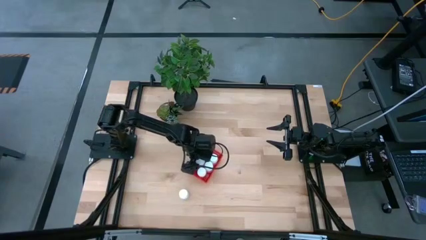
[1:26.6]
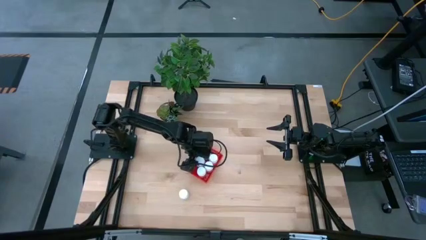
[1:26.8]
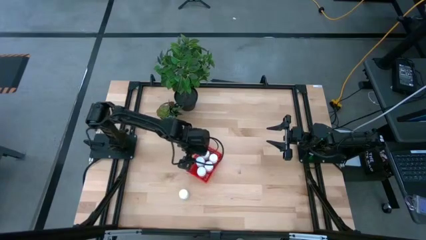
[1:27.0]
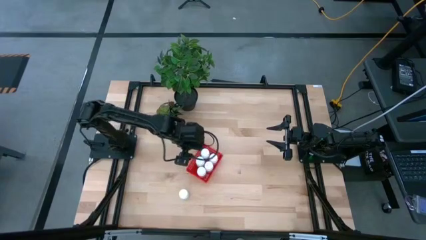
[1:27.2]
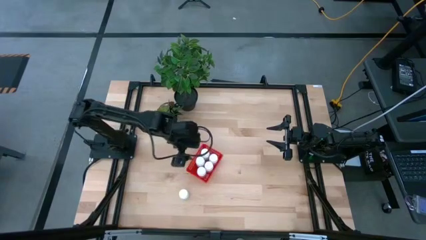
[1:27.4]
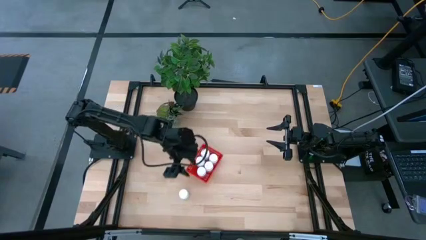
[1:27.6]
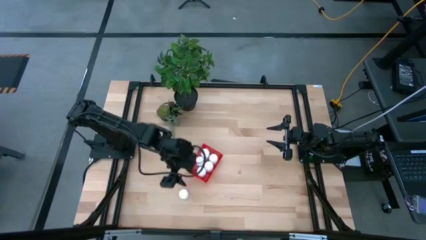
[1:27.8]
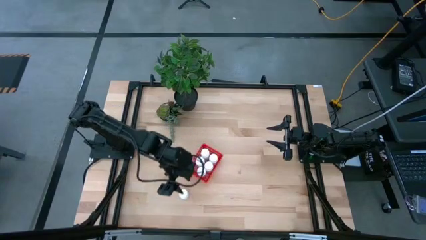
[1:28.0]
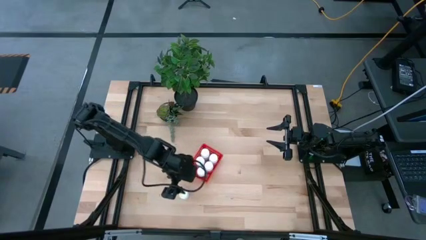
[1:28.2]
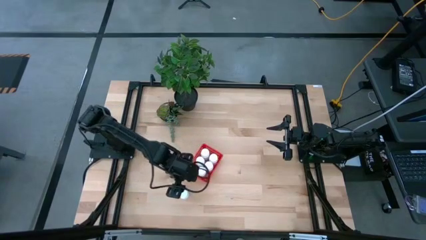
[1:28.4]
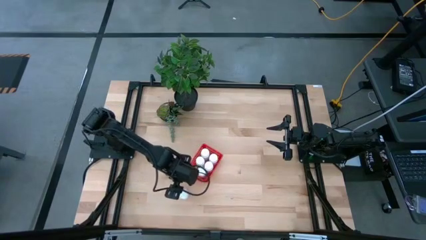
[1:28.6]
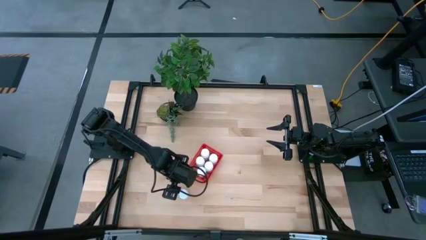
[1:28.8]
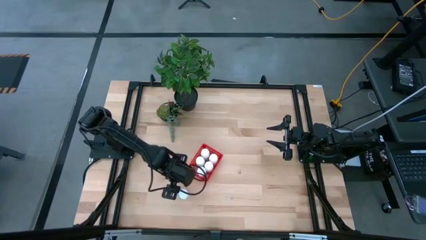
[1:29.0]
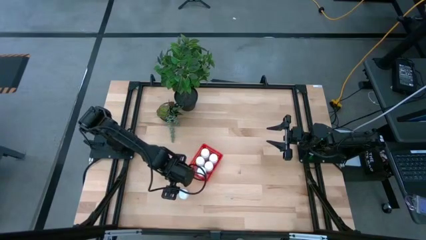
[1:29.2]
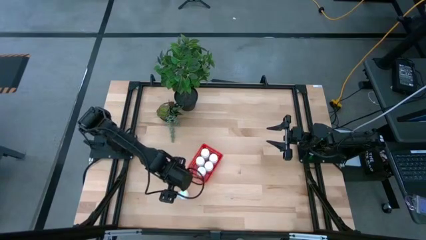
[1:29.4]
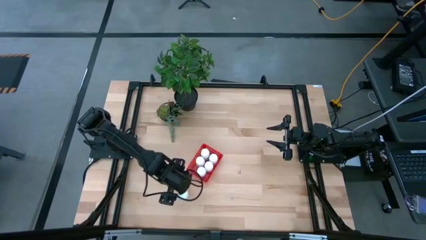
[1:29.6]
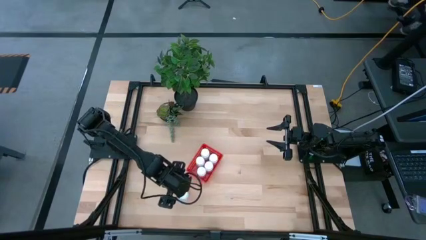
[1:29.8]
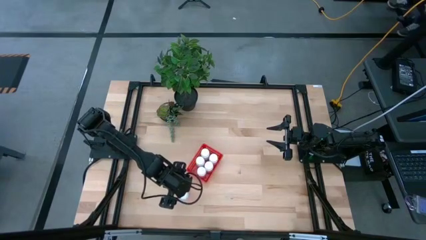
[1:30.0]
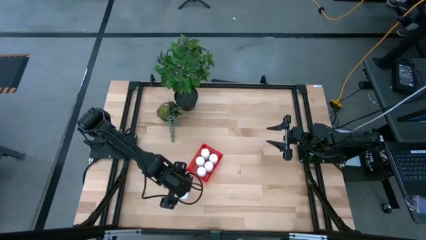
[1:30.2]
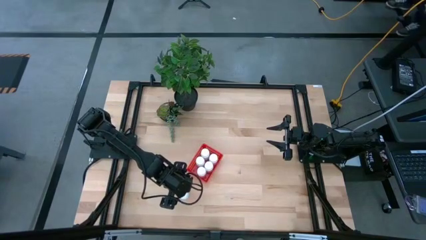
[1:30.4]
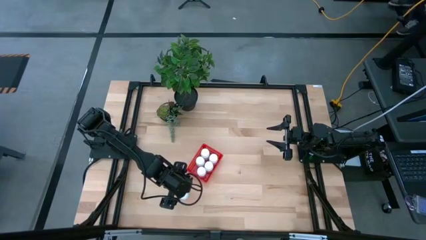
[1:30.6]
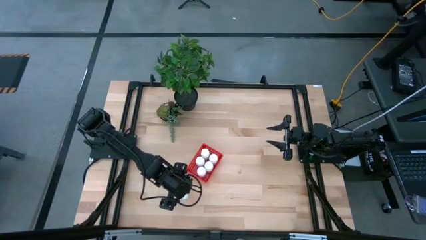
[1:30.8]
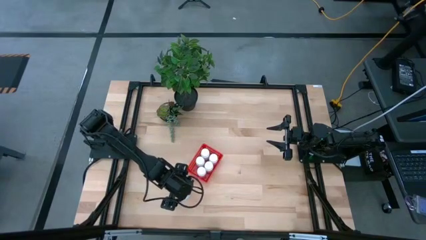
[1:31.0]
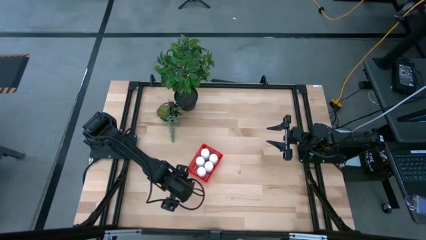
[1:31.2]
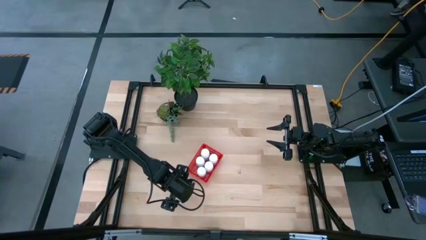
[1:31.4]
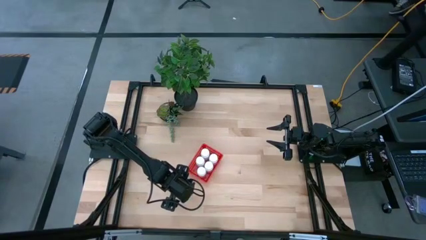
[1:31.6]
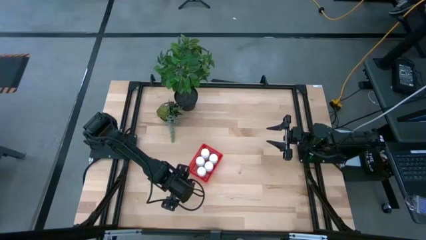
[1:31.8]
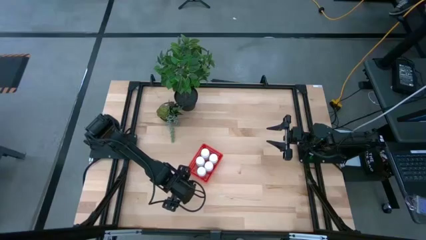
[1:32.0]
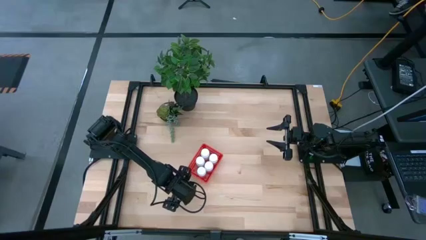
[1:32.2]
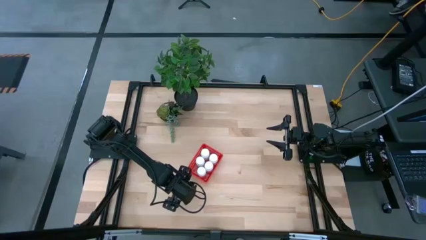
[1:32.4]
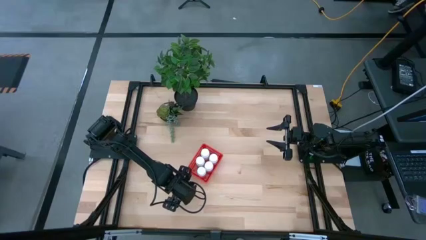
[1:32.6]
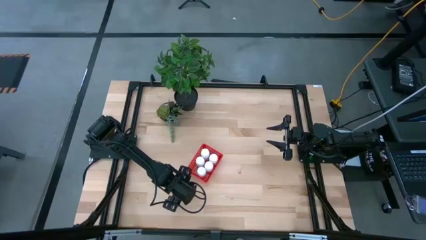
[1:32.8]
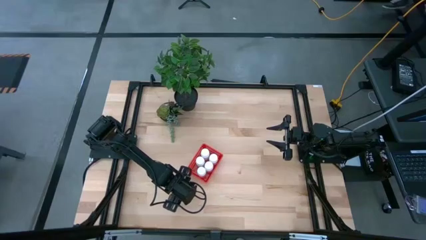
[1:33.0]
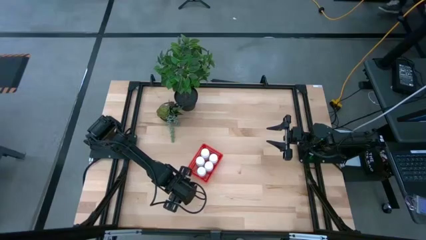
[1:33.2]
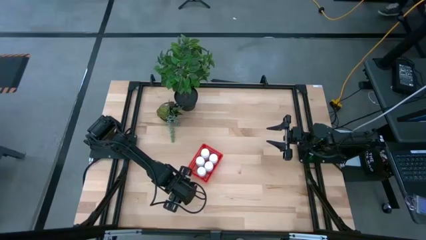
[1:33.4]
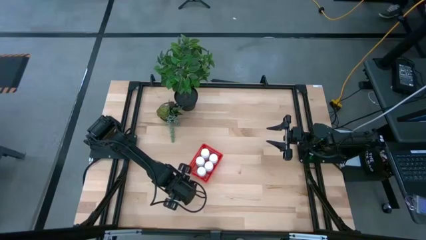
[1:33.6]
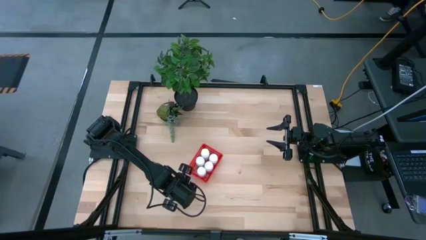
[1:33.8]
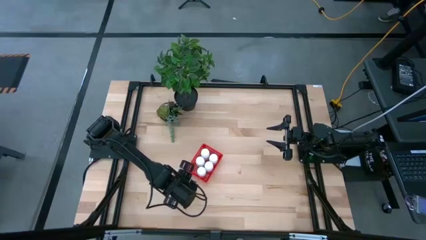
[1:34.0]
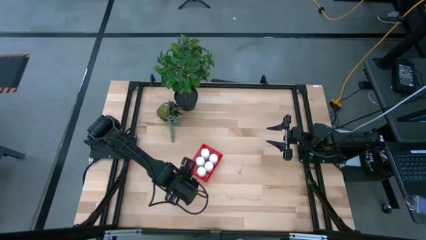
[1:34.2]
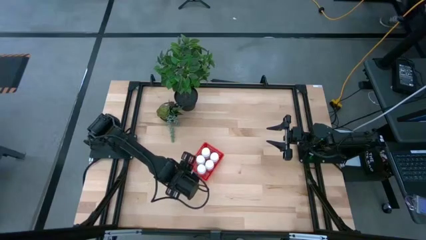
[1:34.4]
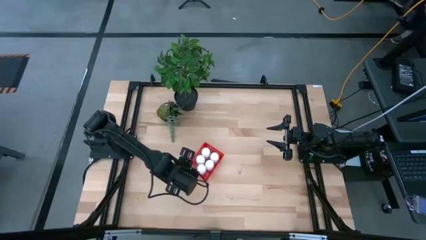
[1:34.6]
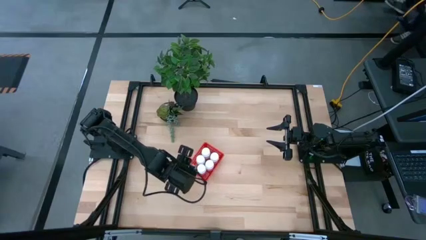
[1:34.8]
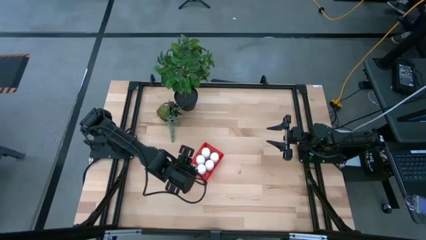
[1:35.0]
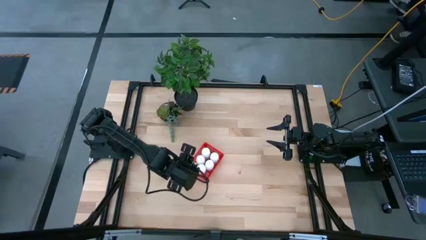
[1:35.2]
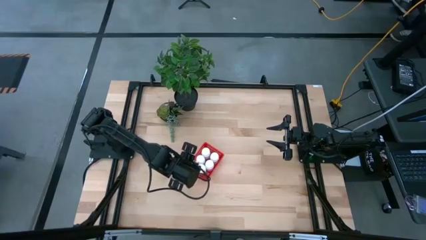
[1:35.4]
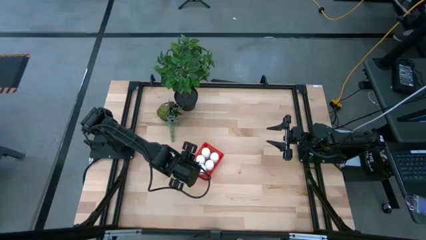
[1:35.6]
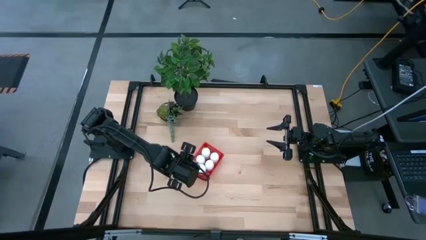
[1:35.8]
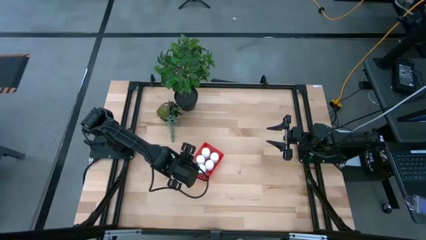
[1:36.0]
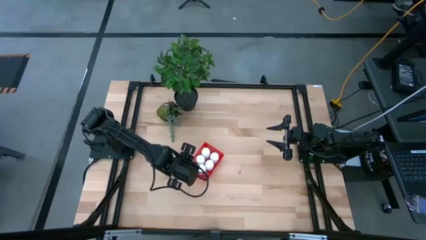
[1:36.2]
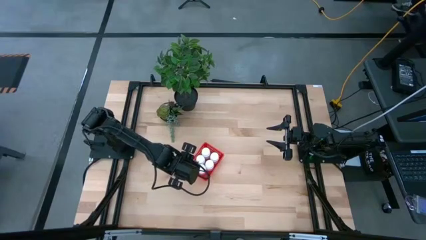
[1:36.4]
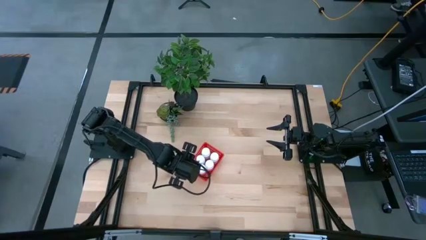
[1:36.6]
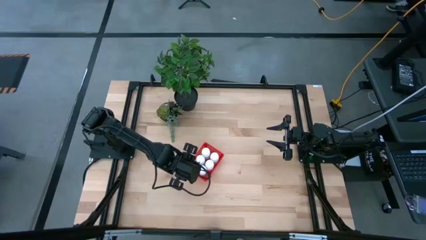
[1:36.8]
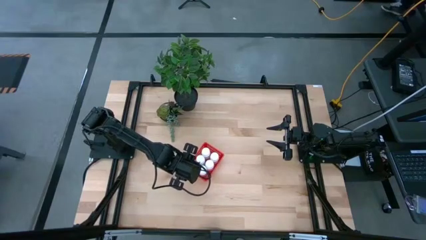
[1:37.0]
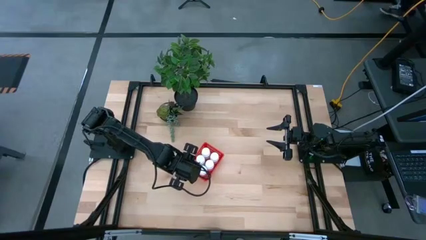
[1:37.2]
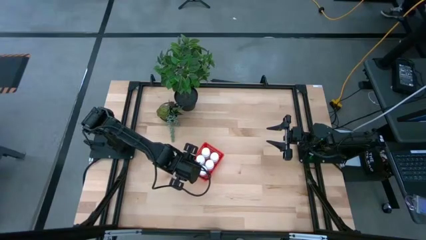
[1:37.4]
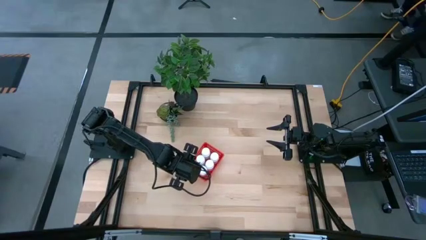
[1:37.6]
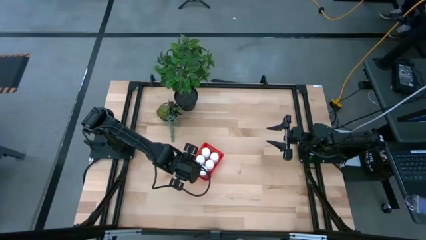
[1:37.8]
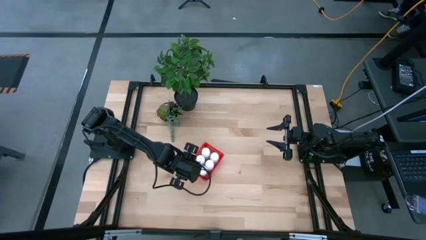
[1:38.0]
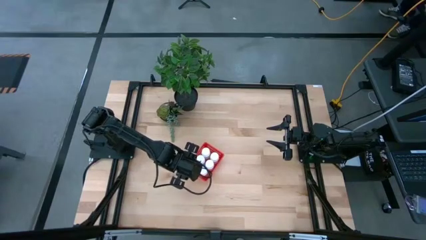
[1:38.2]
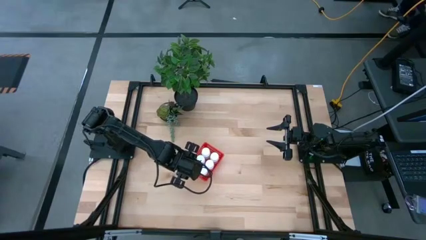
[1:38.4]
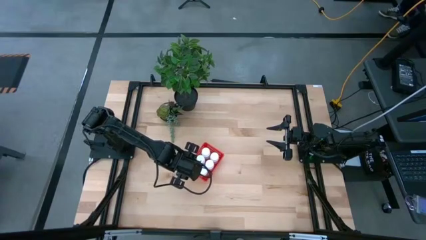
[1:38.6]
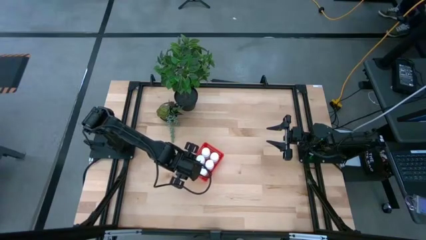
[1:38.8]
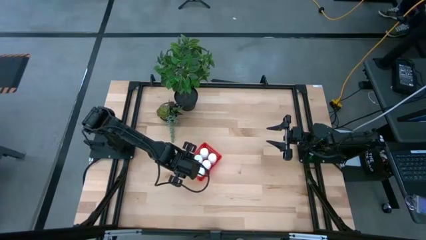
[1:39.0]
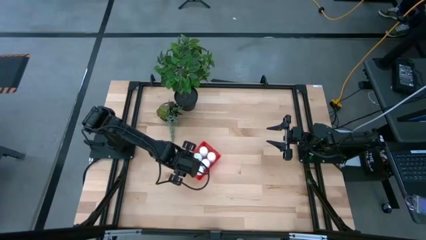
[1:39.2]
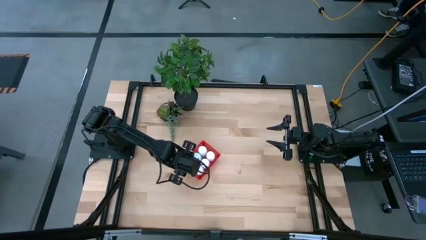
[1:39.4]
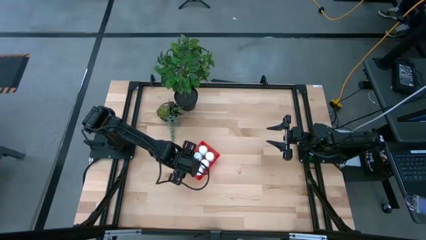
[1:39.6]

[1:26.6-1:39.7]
Task: Pick and place pill bottles into a basket
Put the white medicine bottle into the red bin

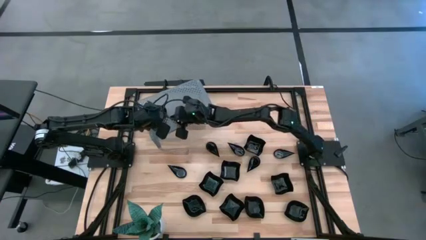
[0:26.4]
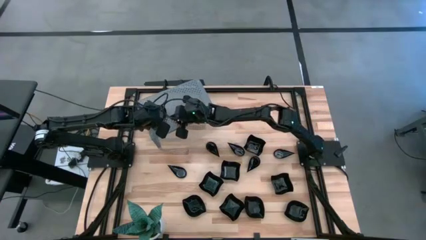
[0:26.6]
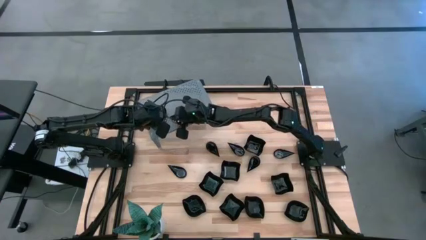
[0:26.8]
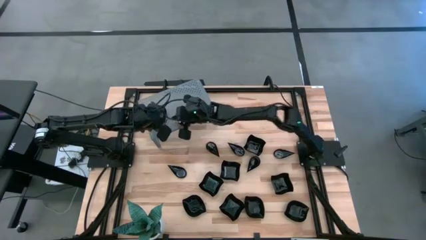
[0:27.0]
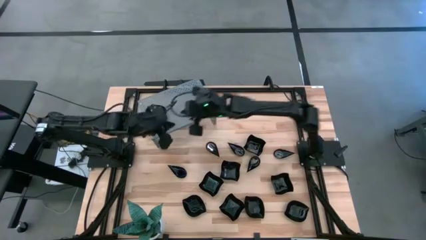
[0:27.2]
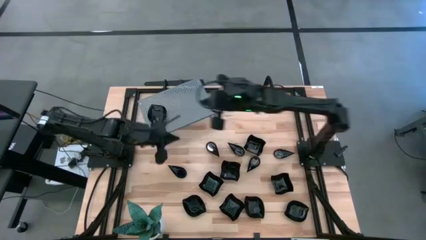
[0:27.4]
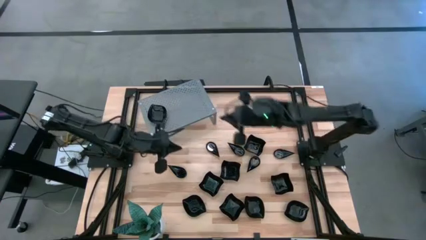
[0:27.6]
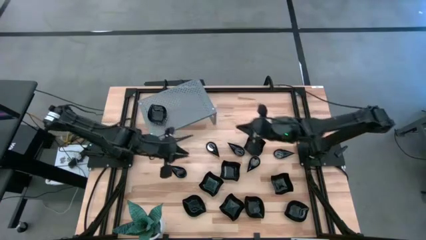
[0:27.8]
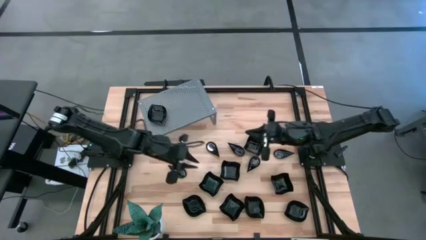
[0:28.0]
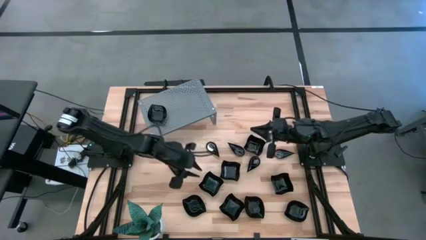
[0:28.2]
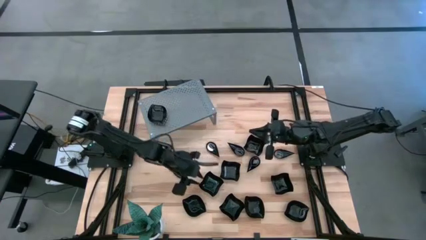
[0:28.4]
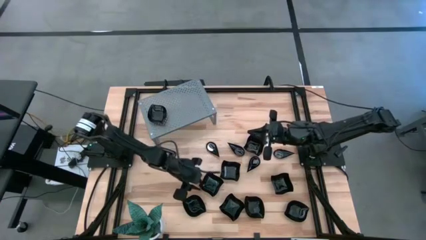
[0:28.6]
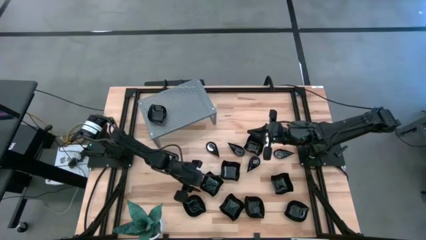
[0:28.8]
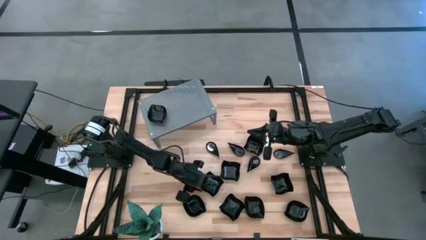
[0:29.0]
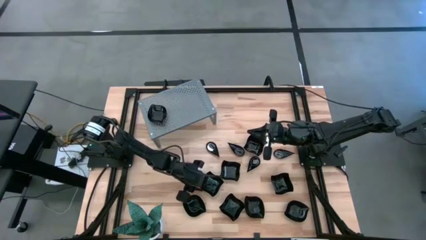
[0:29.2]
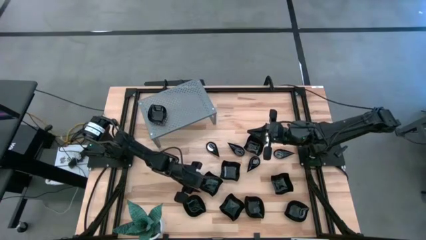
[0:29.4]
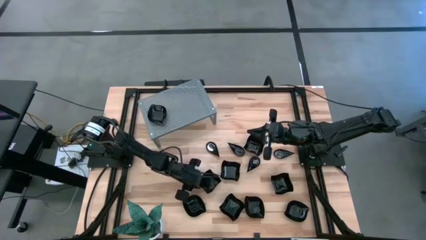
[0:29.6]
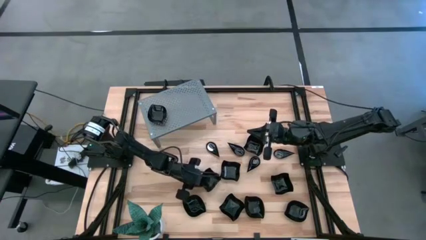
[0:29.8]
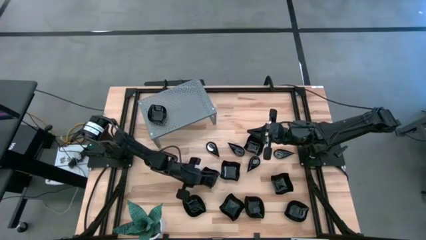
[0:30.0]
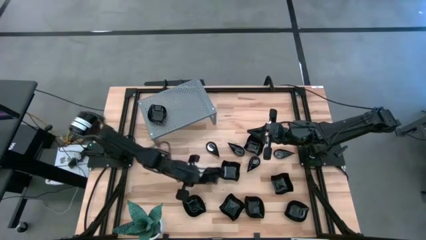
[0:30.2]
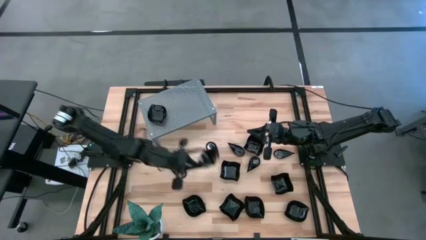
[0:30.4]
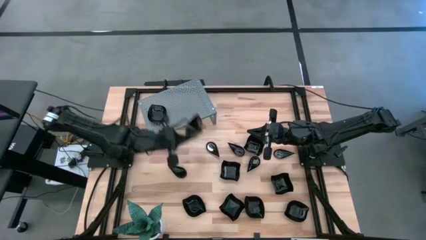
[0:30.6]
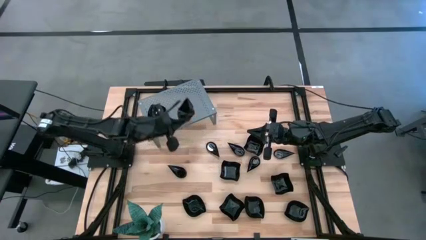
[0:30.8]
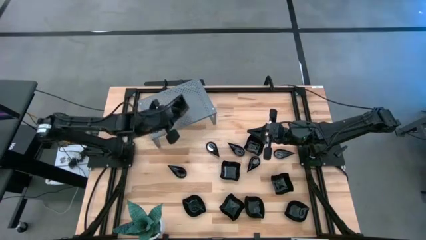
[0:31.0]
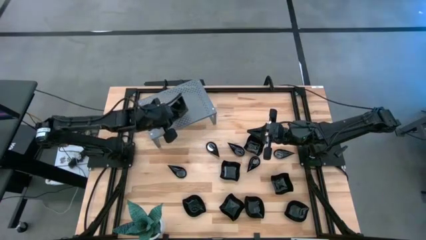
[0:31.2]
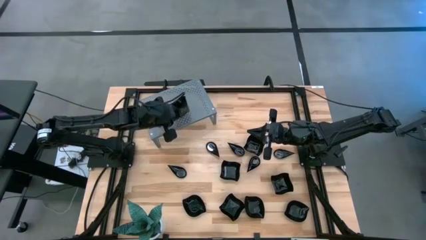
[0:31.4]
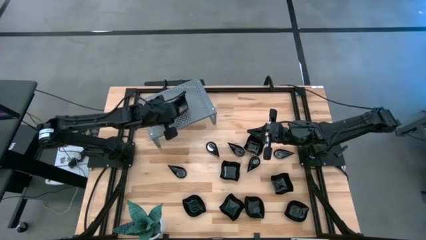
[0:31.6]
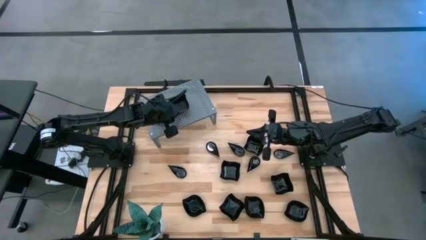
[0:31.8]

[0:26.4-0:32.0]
Task: Pick & Place Mini shaped plates
Put the black distorted square plate on the shelf
